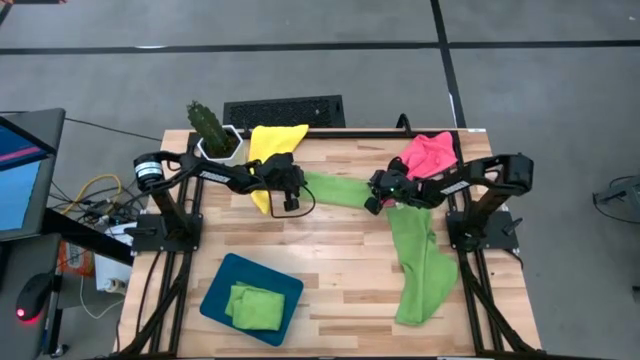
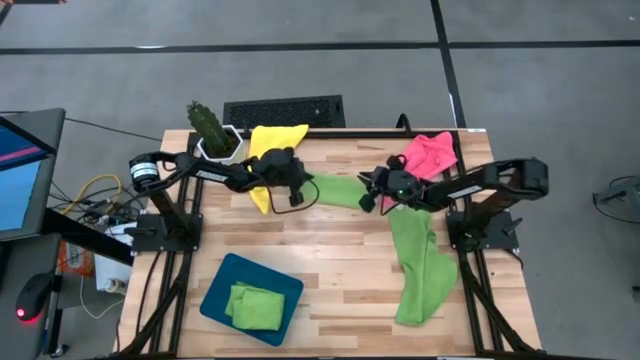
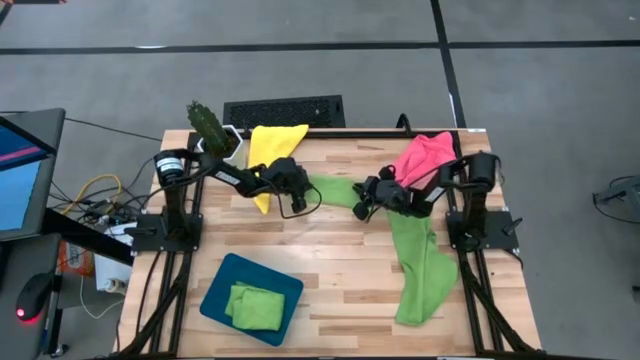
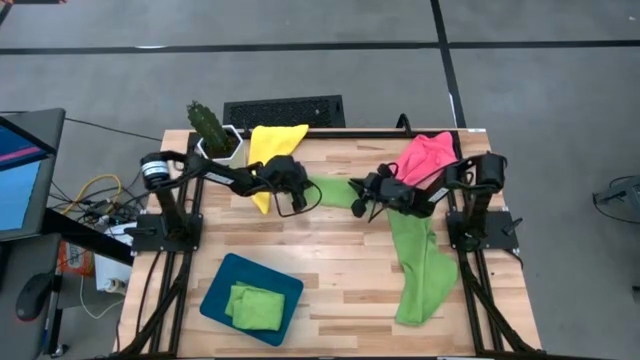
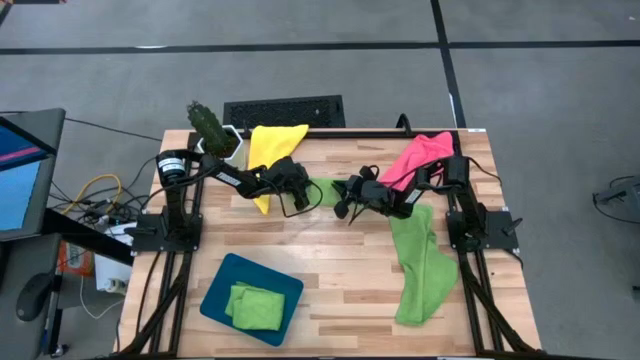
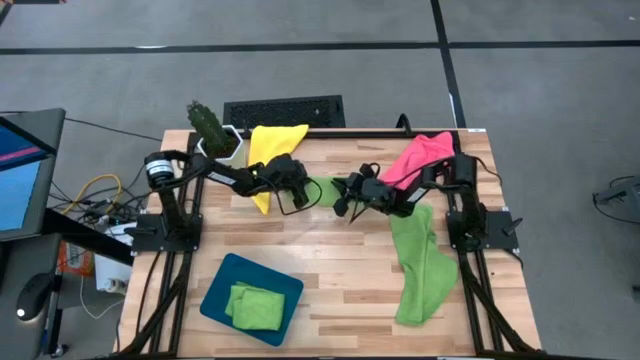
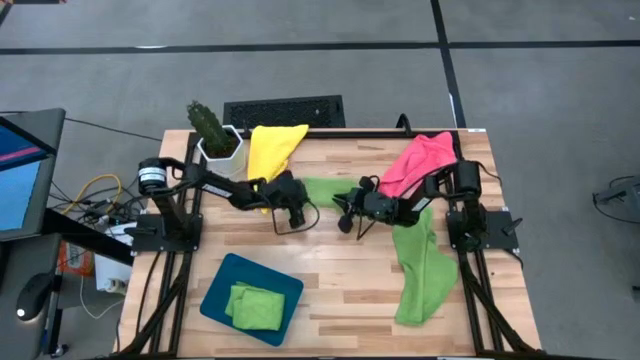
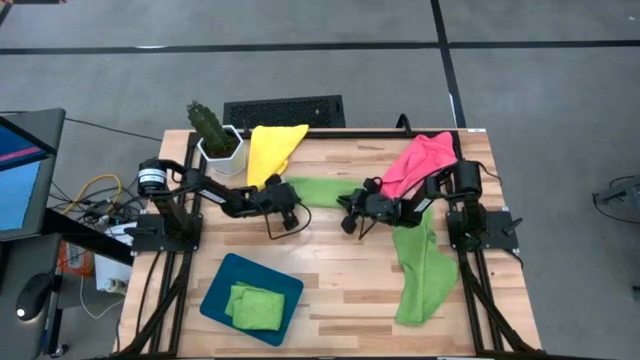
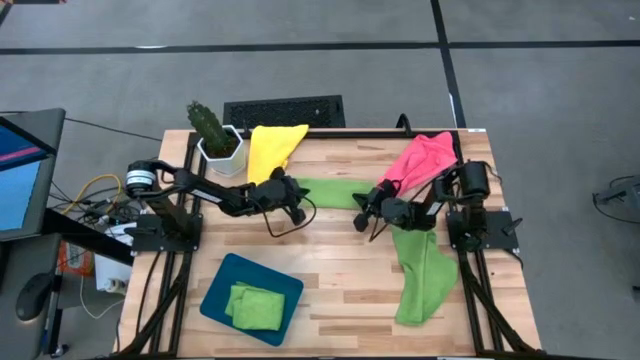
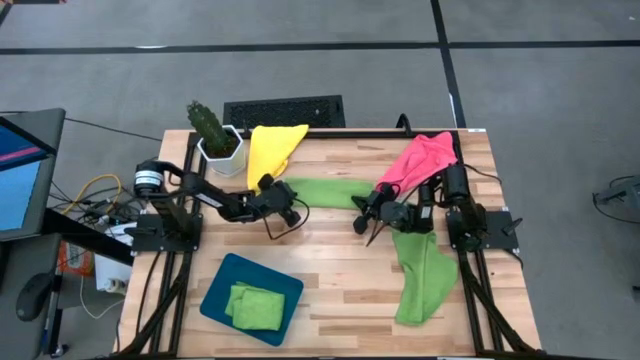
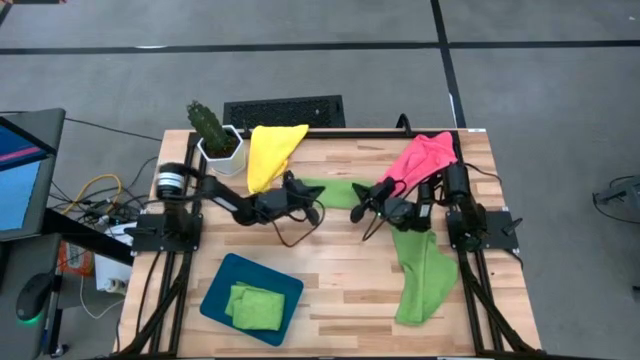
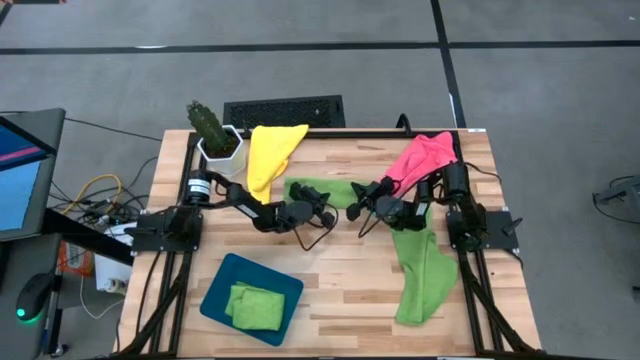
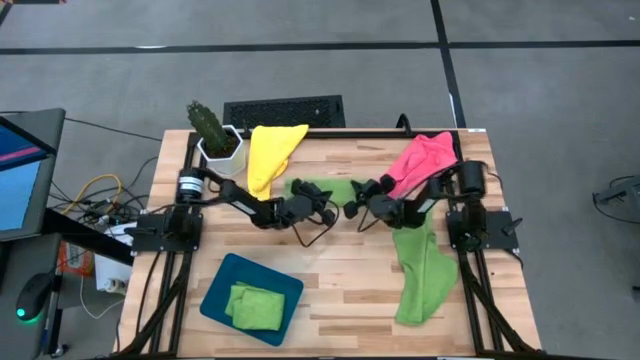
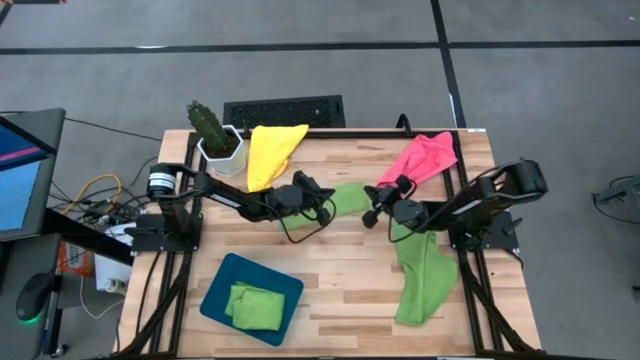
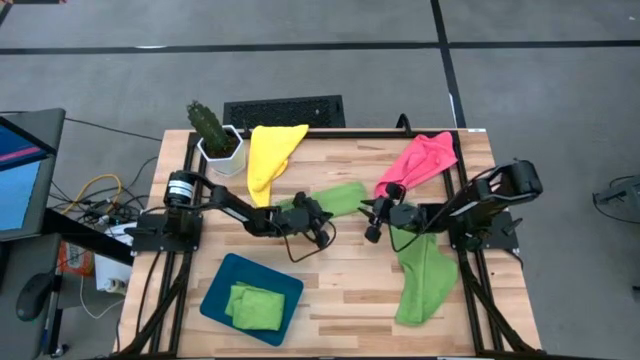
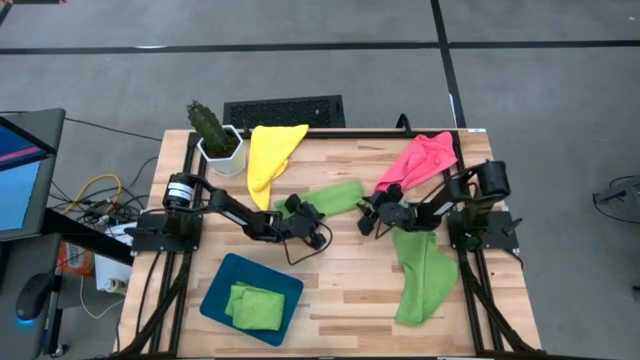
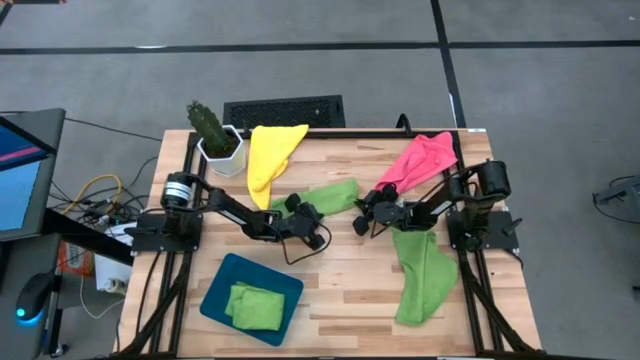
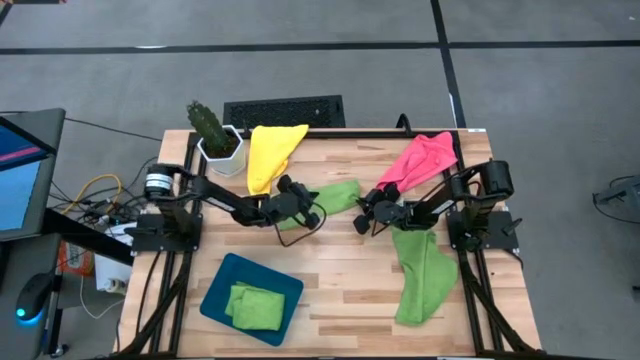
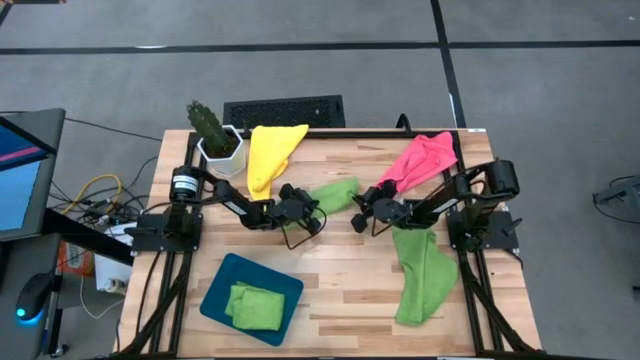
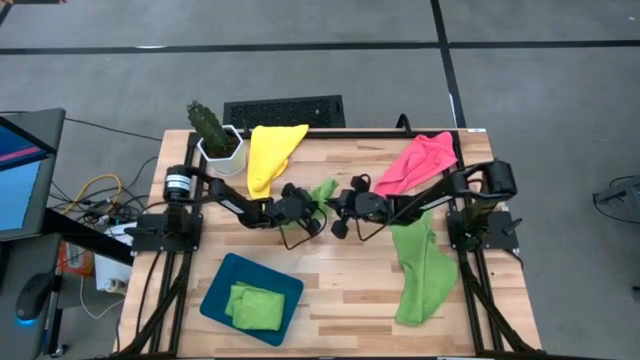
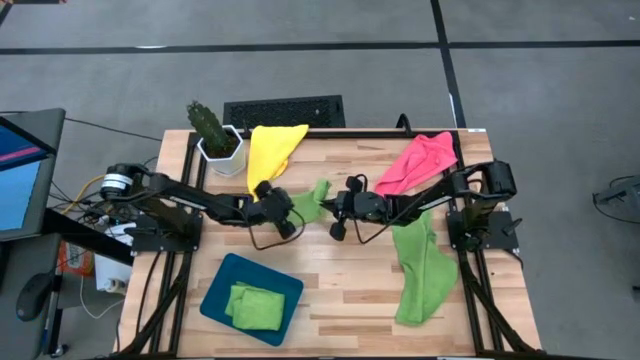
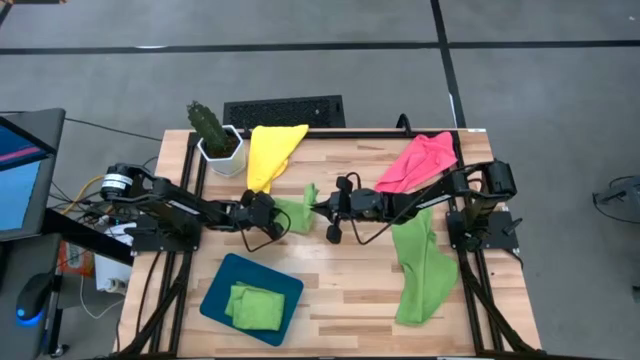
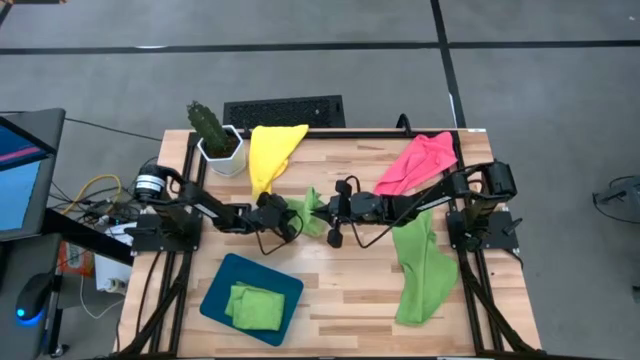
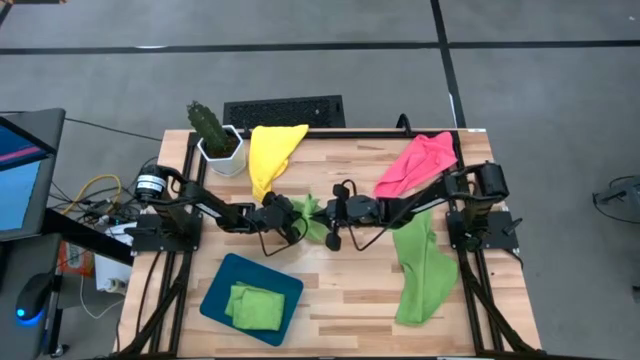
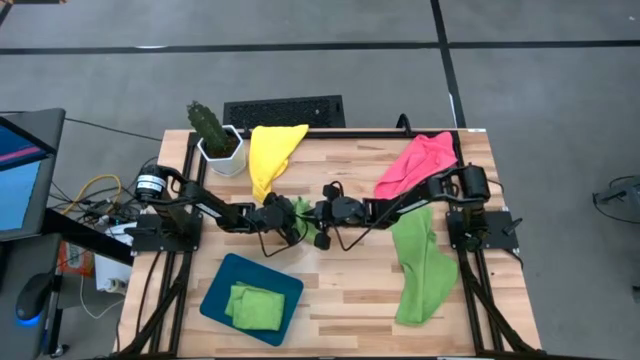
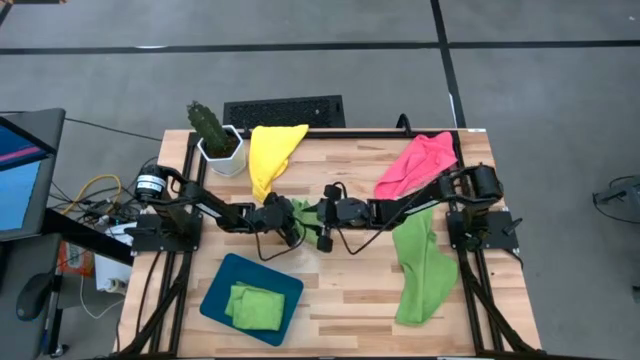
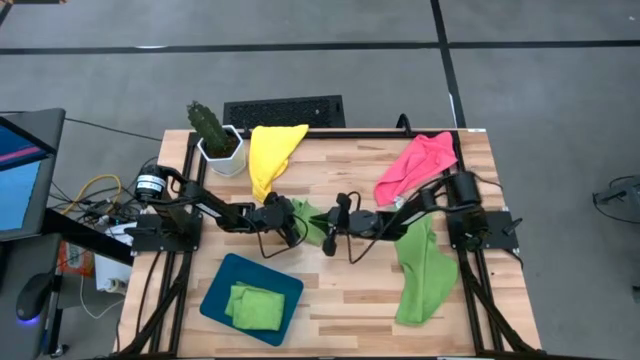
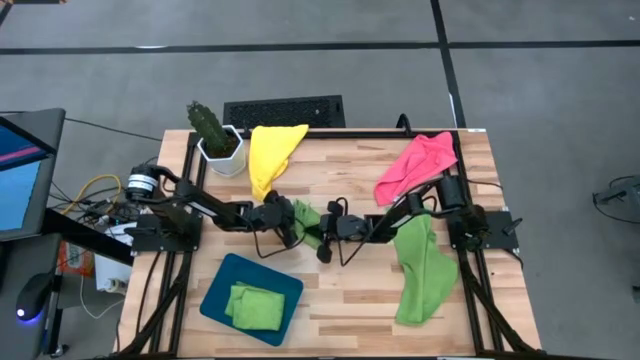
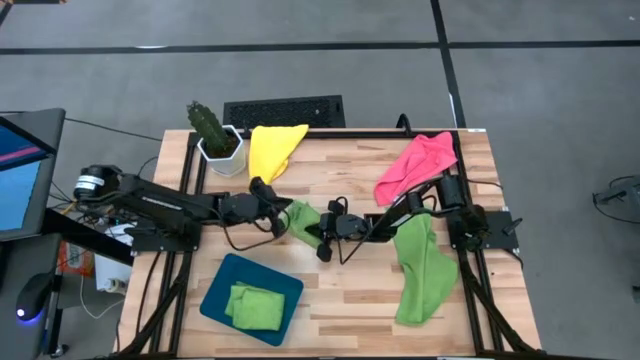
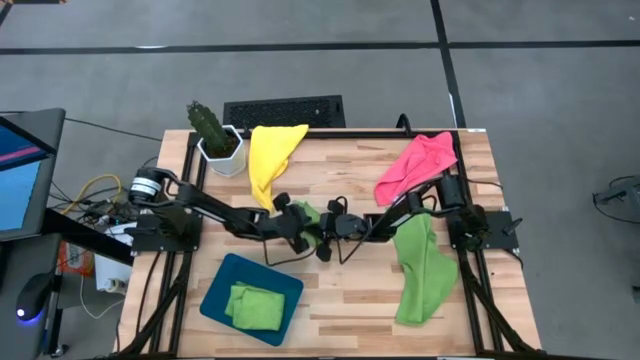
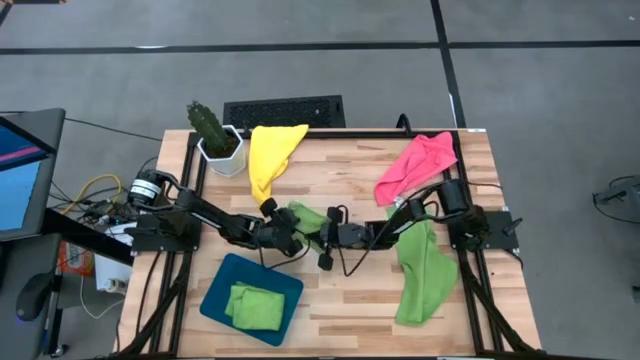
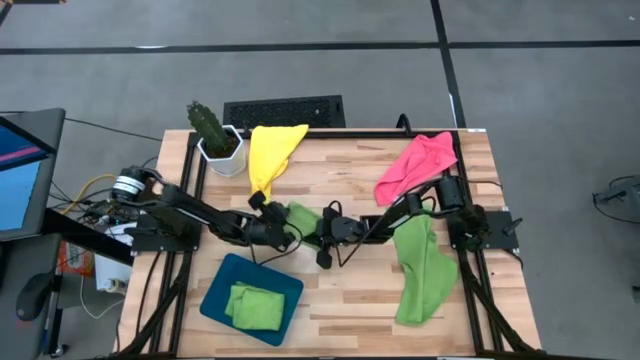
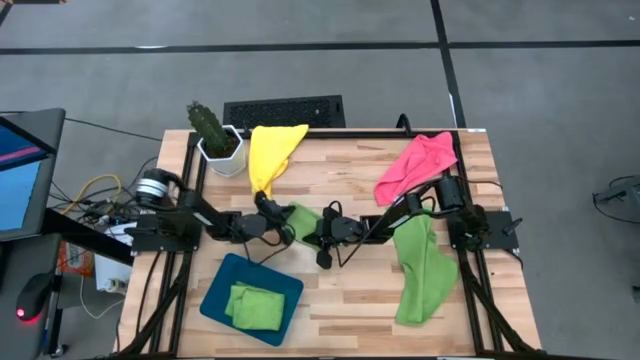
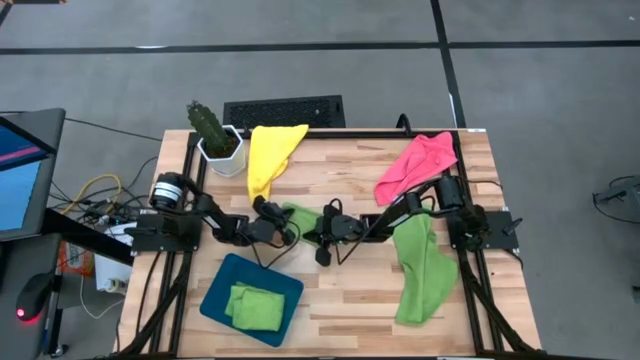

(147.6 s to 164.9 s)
Task: Fold microfiber towels
Fold the top green microfiber

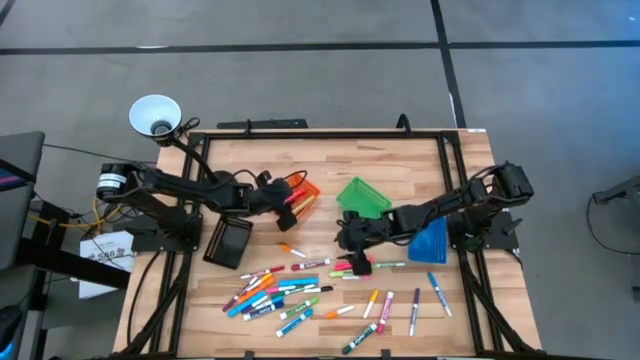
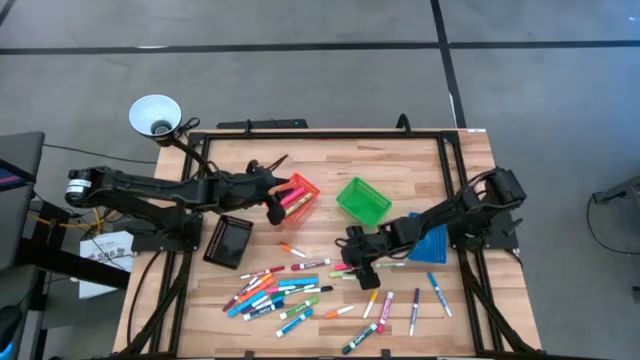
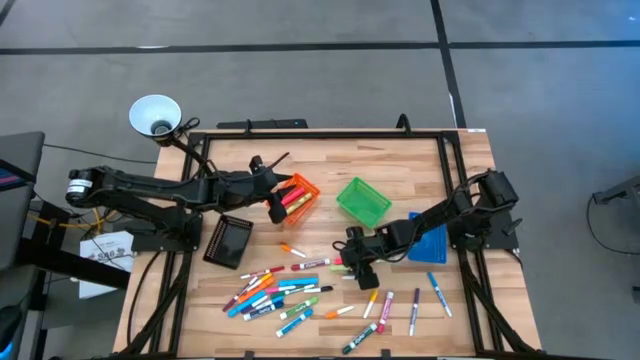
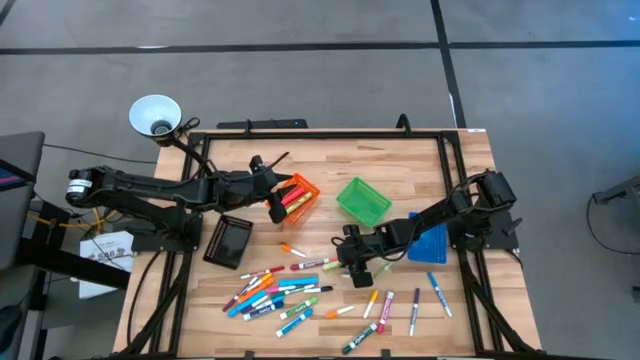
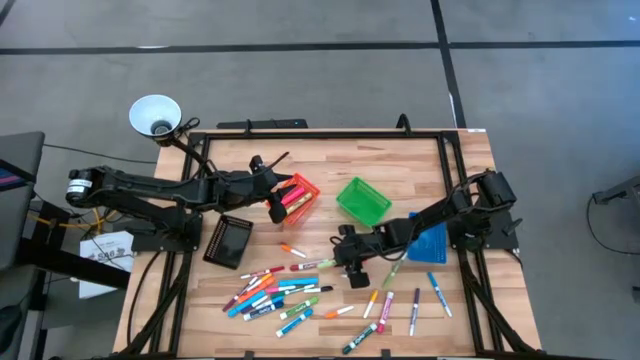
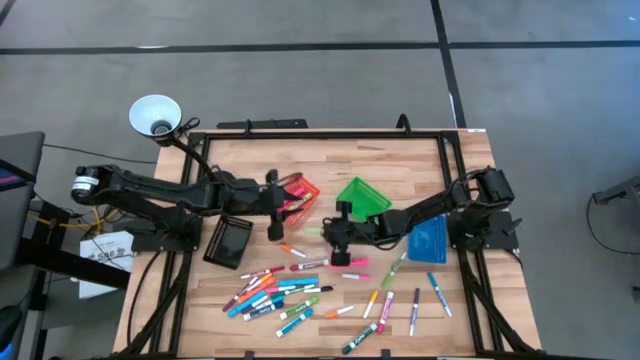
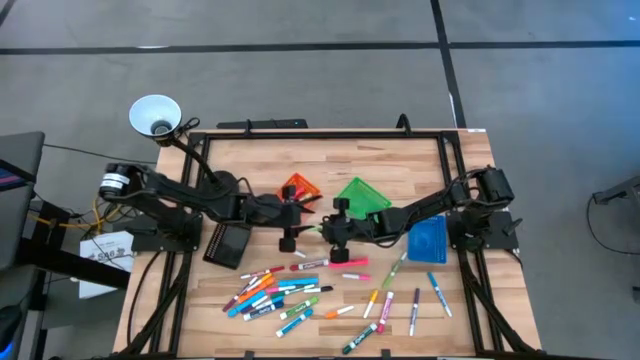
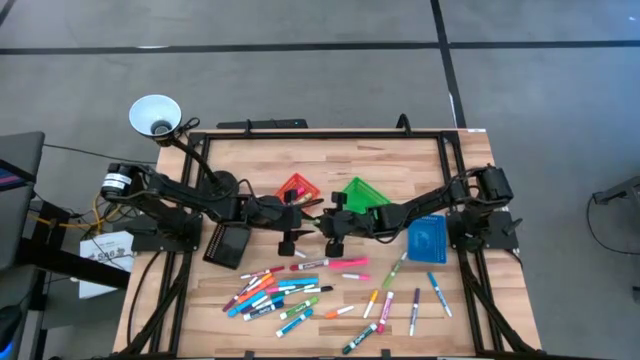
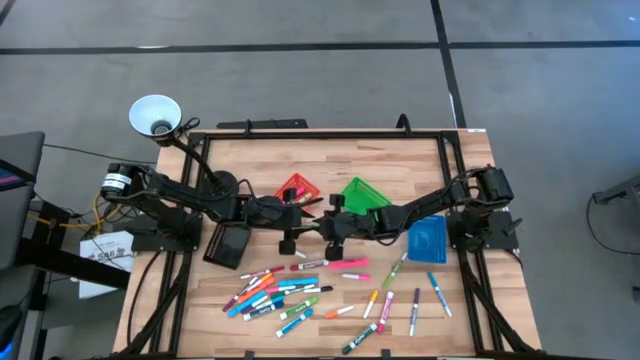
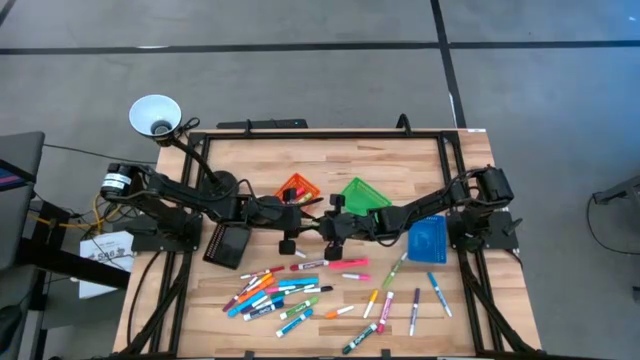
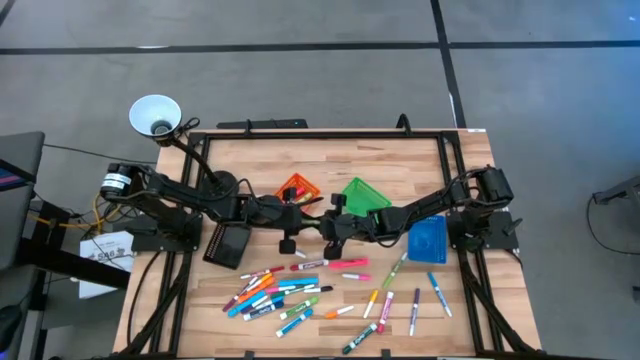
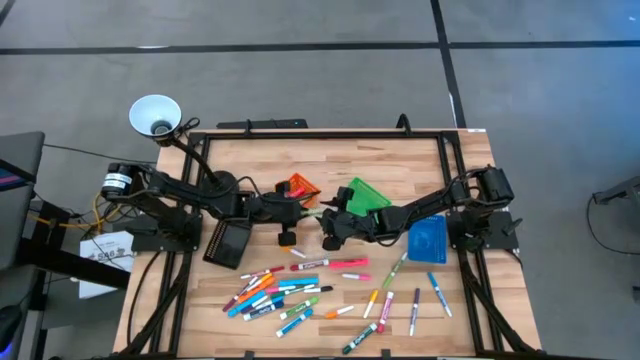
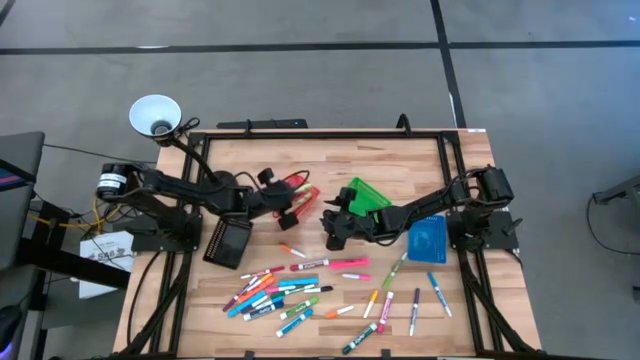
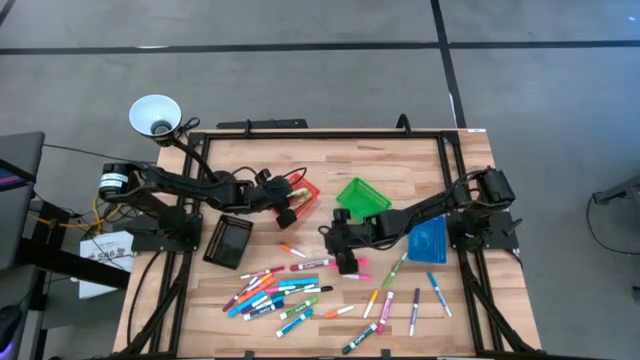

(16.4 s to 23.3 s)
Task: Pick & Place Markers
Put the light green highlighter pen into the orange bin
